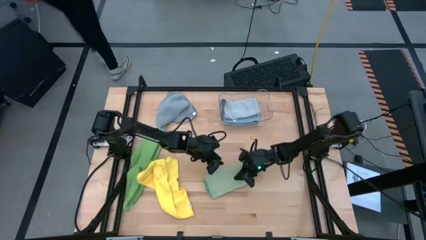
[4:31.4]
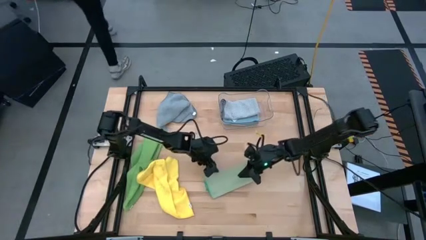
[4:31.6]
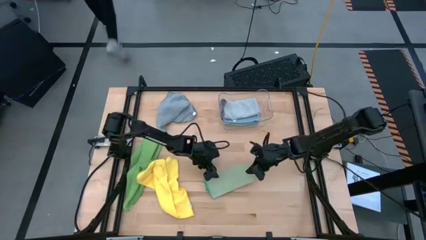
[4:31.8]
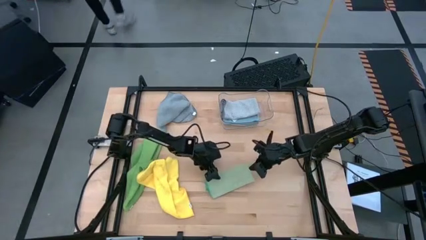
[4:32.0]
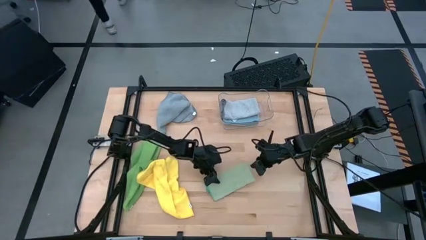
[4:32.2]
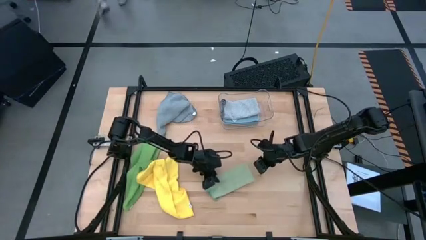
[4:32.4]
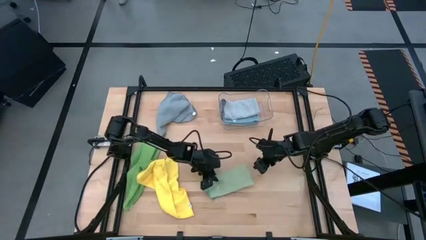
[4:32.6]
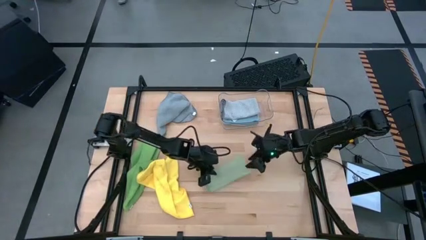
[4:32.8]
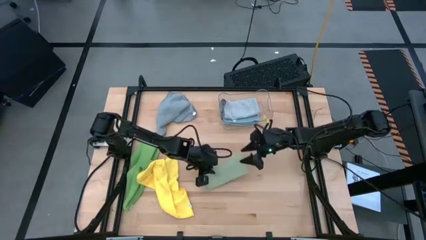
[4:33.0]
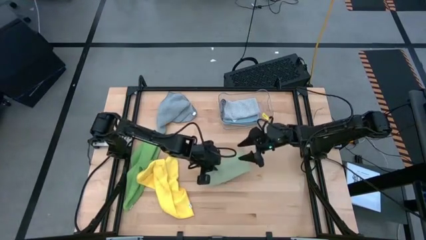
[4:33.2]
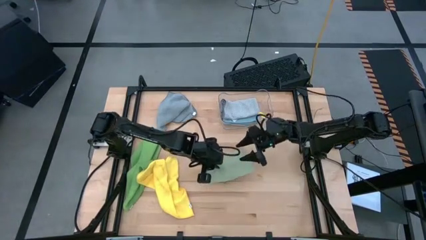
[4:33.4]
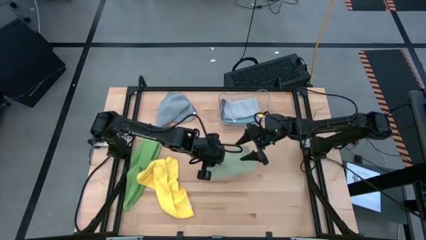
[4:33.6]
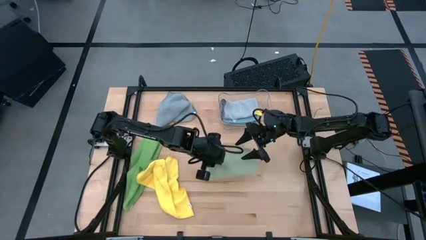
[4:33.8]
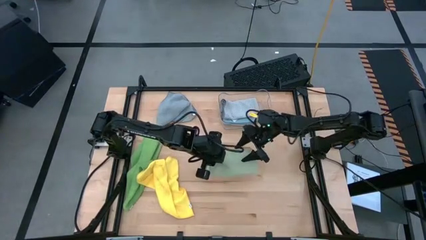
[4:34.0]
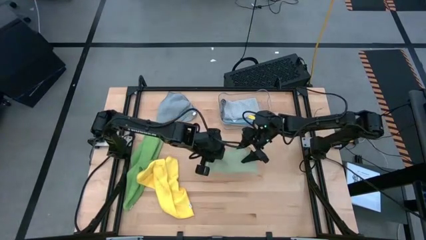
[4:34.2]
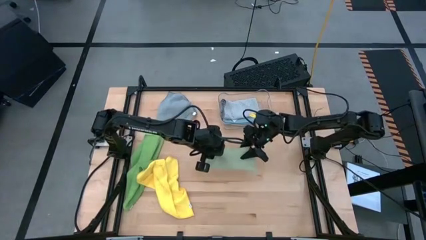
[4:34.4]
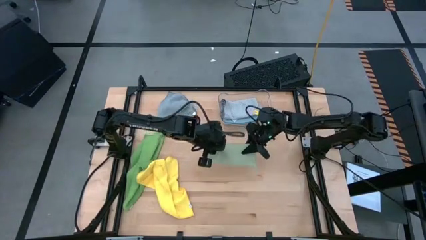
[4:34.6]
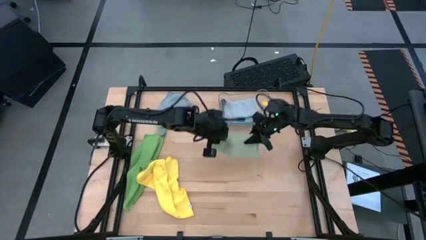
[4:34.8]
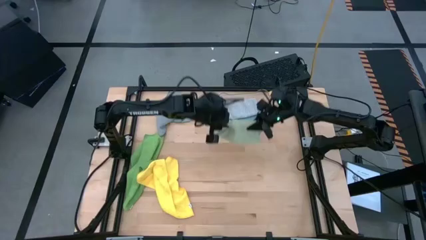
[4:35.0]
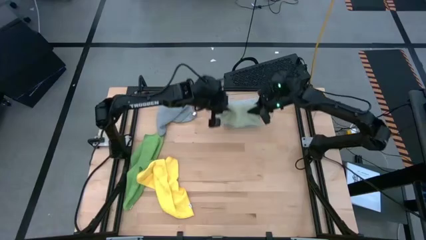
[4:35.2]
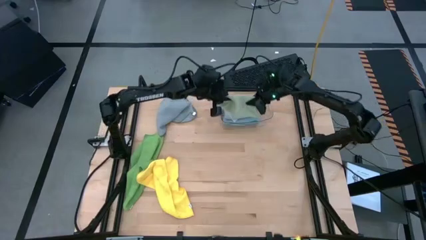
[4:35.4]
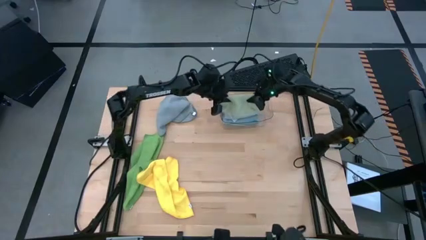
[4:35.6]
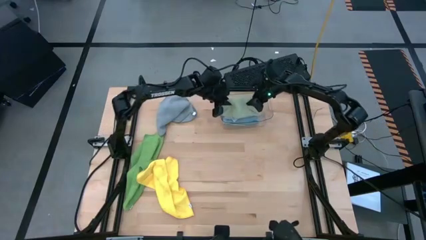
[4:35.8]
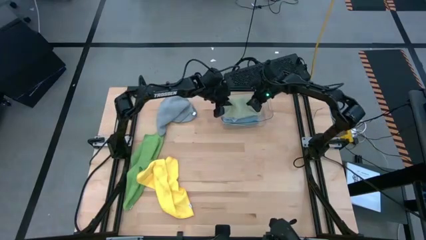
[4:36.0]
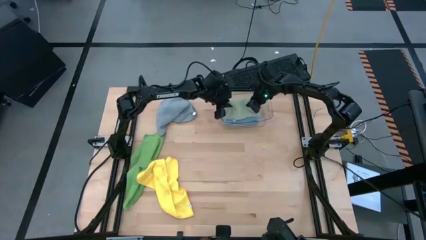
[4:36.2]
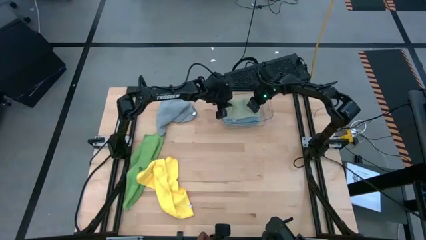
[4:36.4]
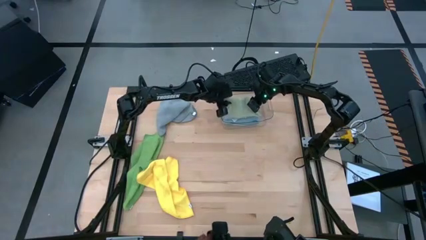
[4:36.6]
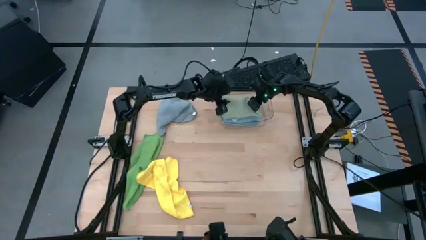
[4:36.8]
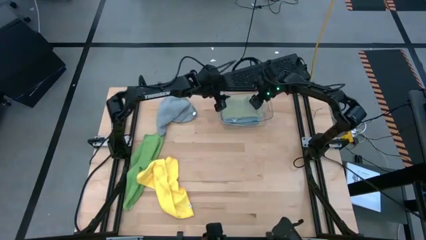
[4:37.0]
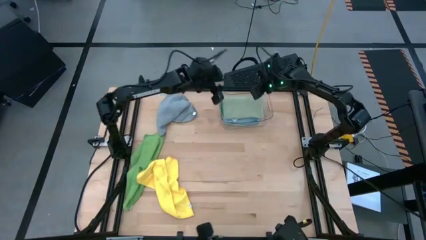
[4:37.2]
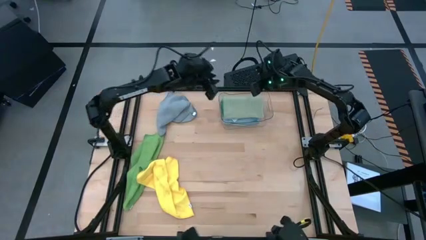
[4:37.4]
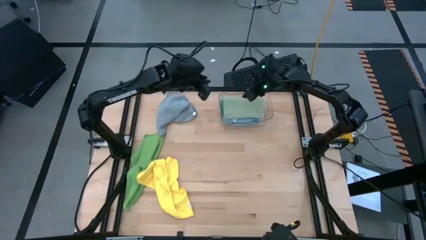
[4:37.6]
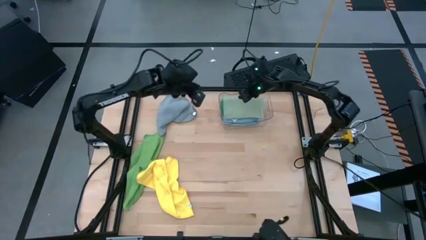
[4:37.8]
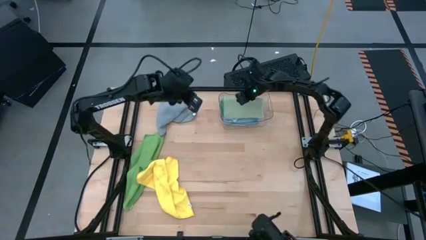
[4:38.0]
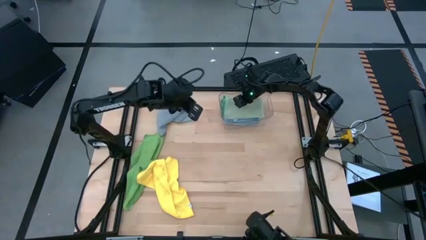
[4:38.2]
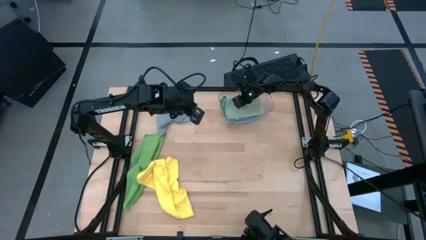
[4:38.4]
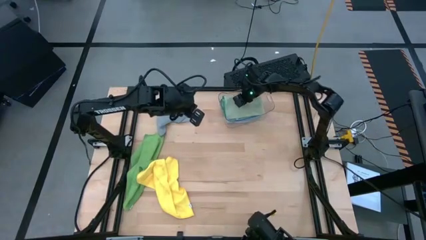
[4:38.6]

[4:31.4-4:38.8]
Task: Fold microfiber towels
Put the light green towel in the transparent bin

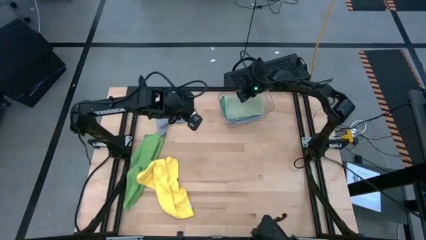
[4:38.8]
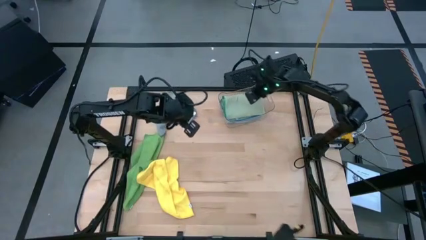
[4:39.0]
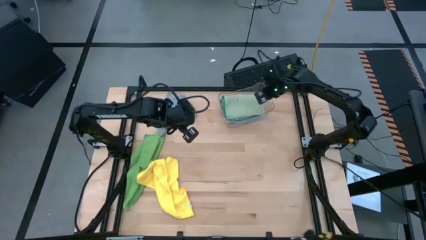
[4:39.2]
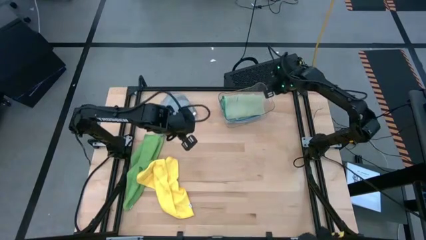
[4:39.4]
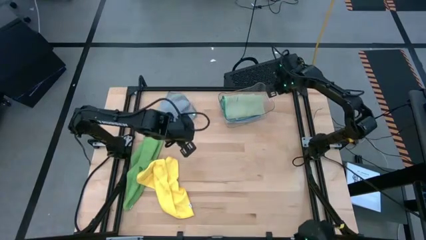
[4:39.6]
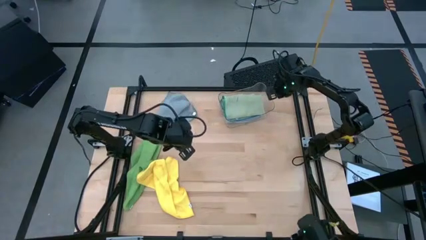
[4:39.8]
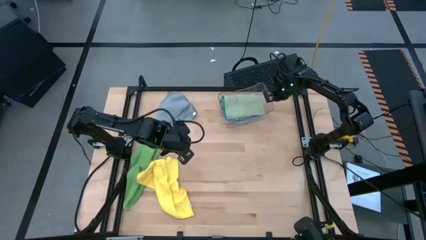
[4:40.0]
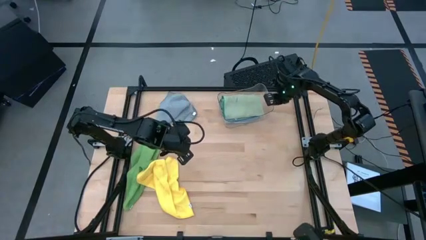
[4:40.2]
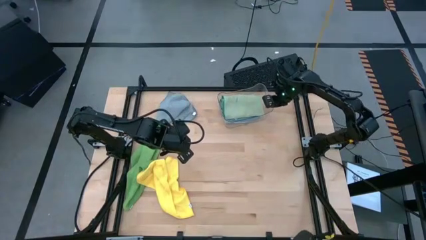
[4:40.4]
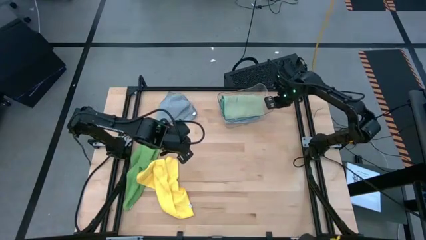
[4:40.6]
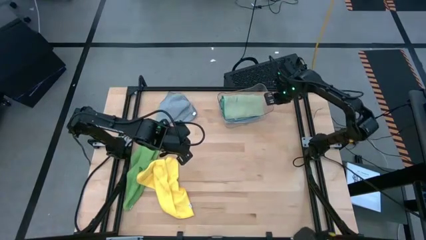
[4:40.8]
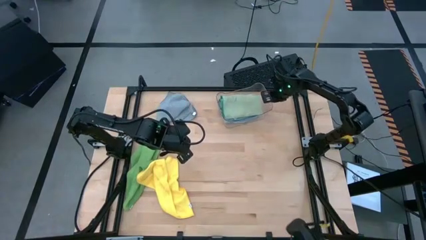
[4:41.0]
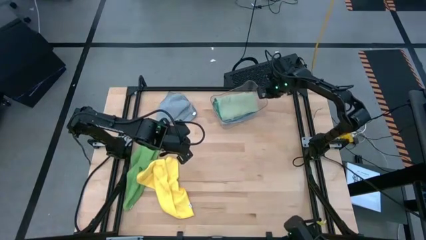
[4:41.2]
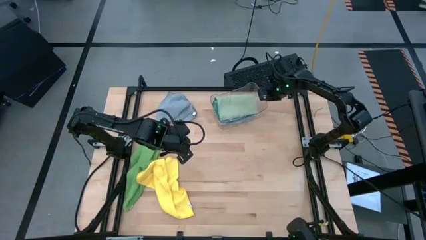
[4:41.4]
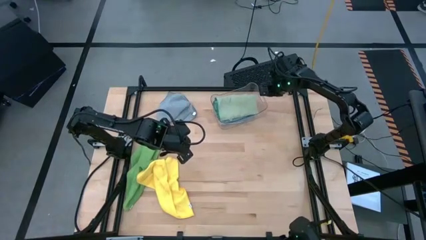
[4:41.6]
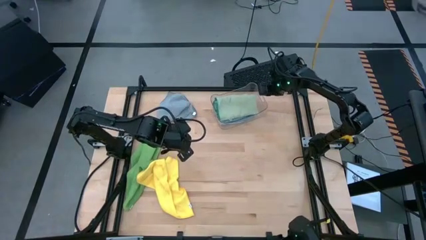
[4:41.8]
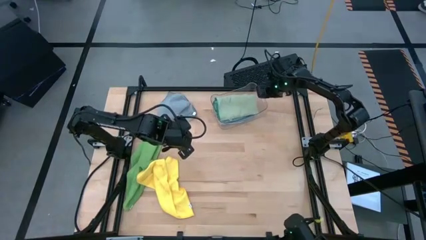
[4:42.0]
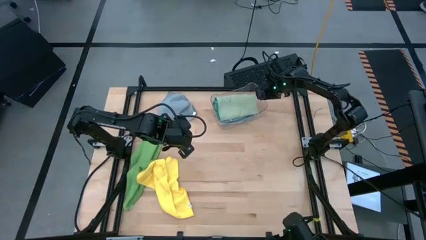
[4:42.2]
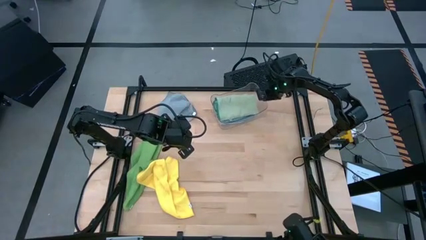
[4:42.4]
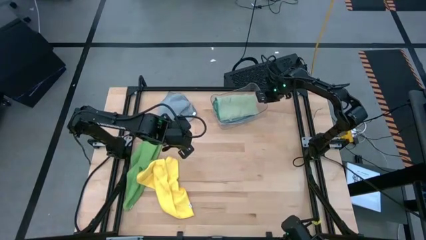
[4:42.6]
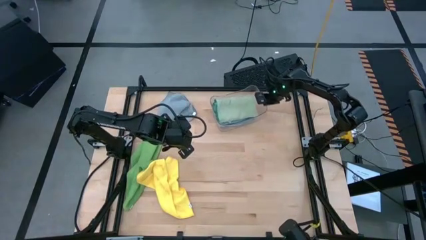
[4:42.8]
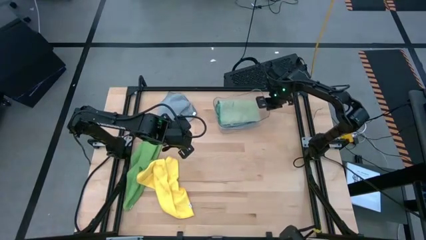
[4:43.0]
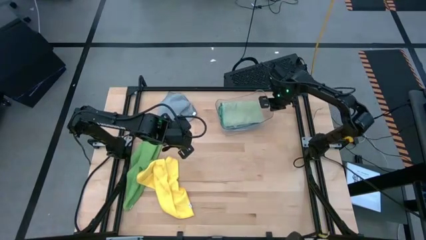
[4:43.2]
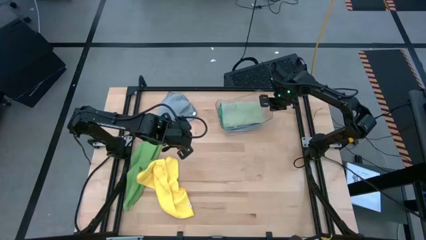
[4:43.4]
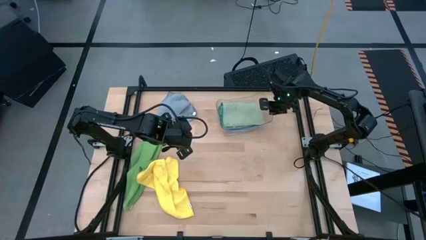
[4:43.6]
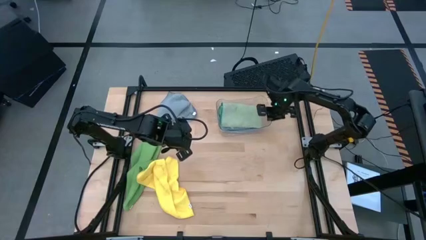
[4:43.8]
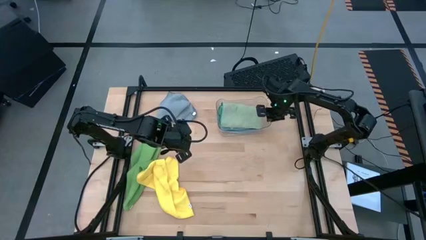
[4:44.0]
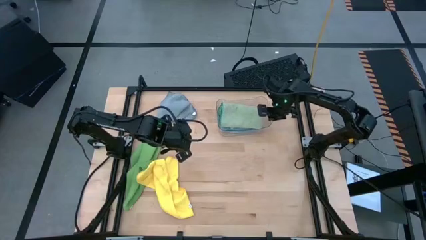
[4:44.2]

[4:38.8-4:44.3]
Adjust the transparent bin

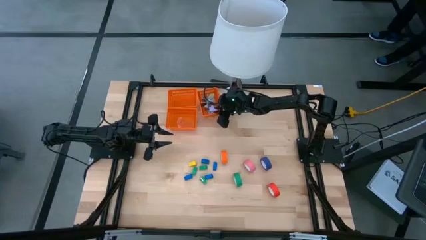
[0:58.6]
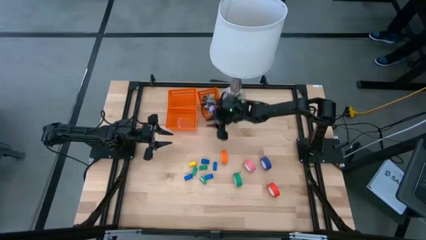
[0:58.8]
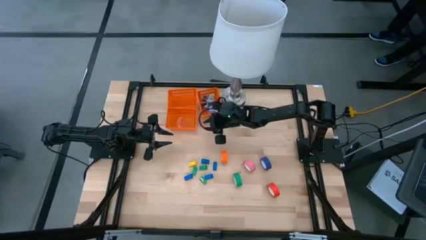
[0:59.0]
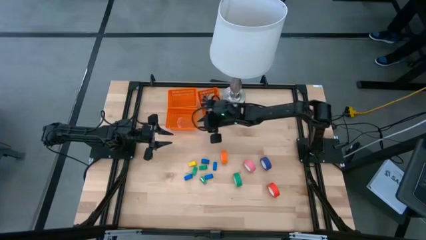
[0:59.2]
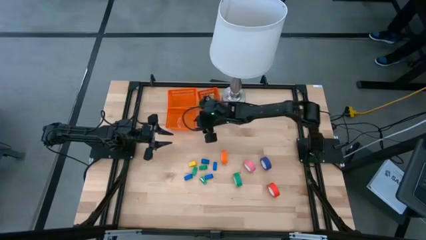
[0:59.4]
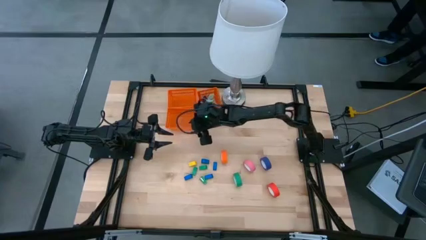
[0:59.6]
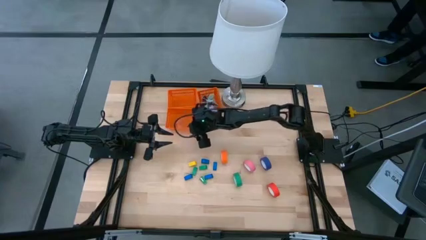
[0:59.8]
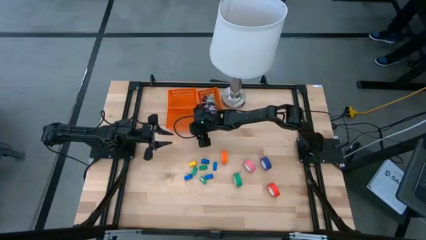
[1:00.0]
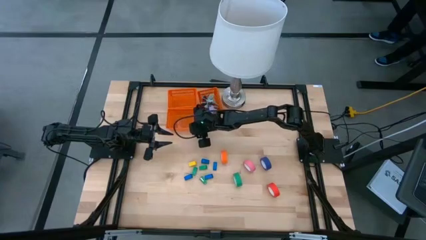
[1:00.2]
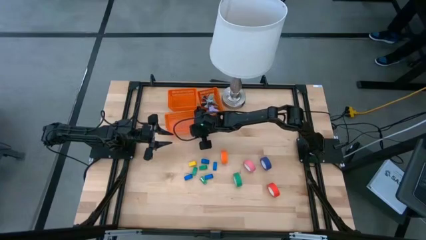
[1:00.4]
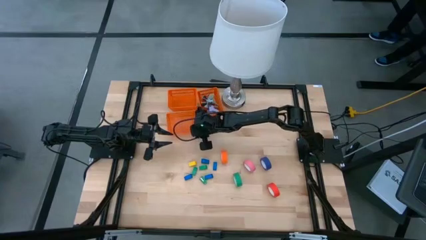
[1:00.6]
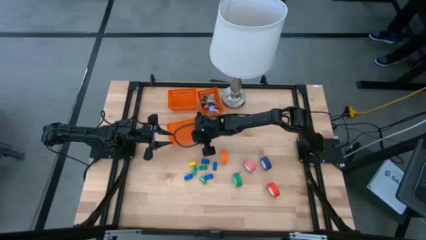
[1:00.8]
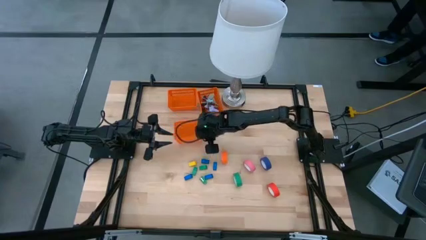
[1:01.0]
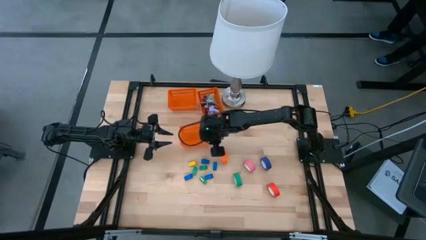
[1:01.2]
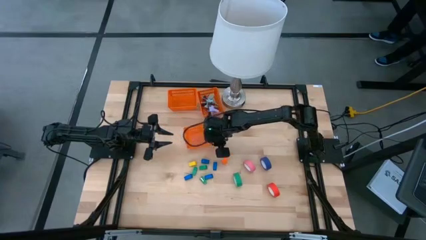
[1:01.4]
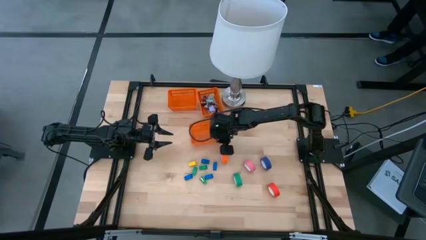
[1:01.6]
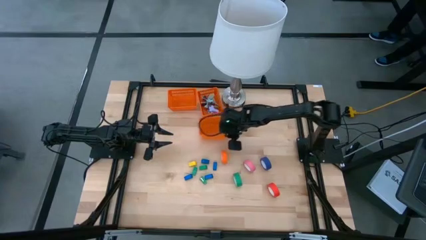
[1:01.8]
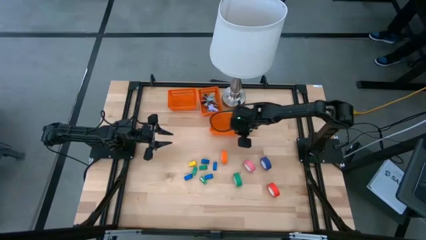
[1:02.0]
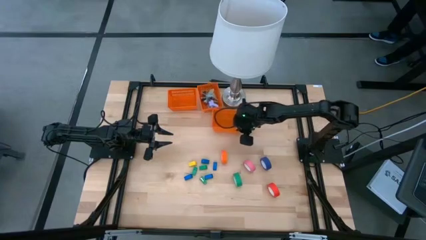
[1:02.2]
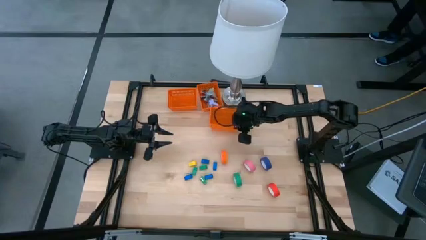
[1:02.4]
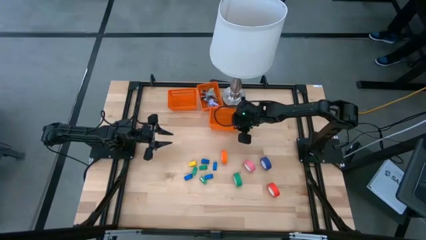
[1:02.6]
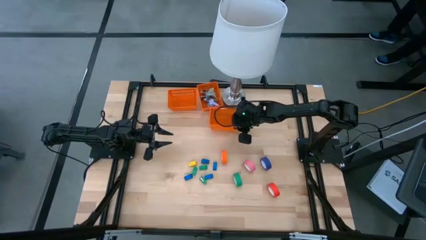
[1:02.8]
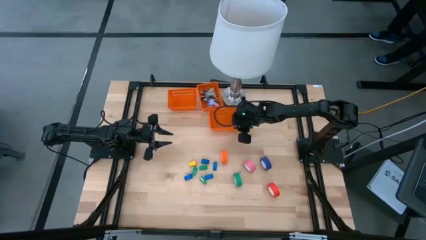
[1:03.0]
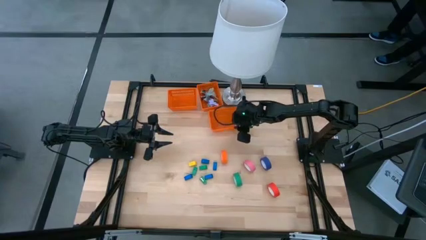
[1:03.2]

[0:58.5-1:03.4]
Task: Pick and place Stapler, Stapler remover, tape
Move the bottom left orange basket to the middle of the table
